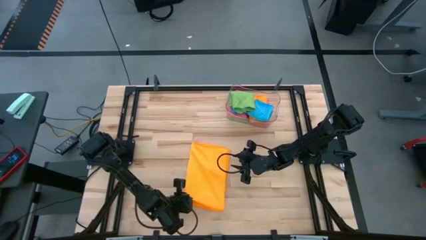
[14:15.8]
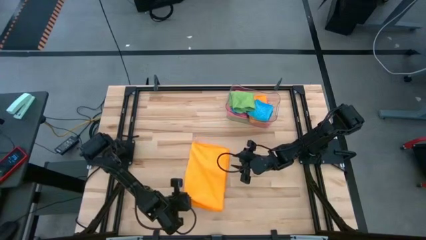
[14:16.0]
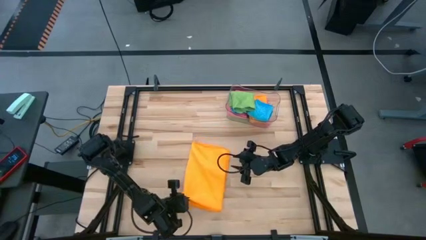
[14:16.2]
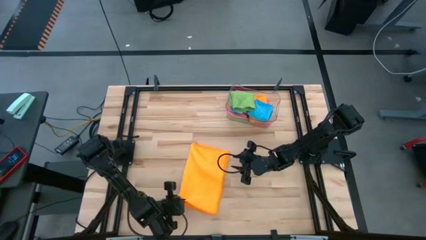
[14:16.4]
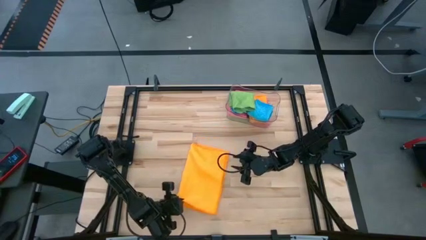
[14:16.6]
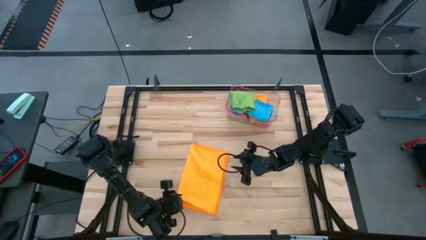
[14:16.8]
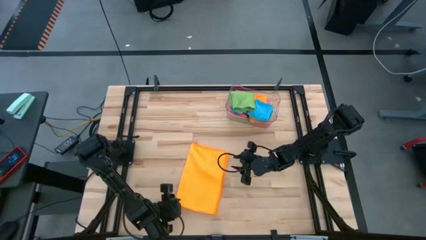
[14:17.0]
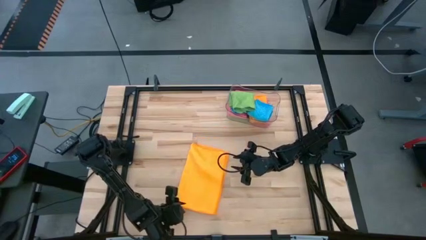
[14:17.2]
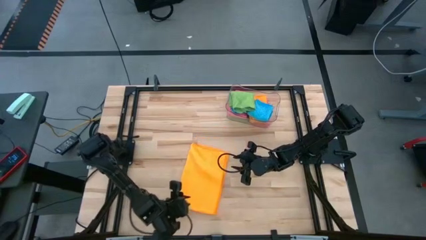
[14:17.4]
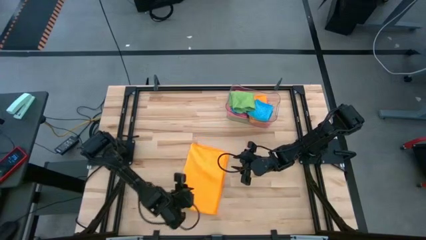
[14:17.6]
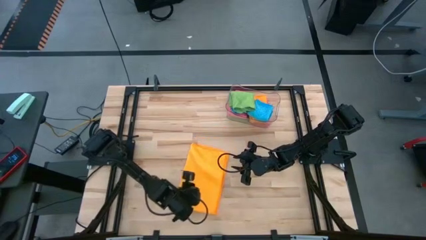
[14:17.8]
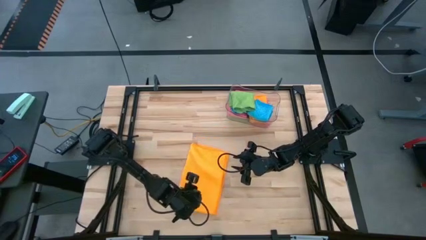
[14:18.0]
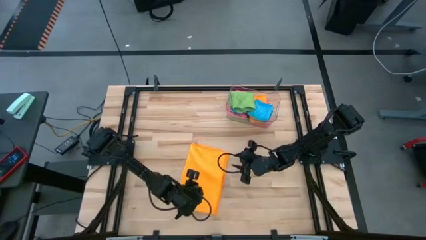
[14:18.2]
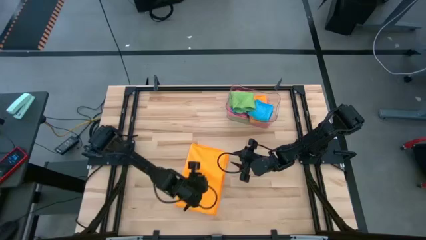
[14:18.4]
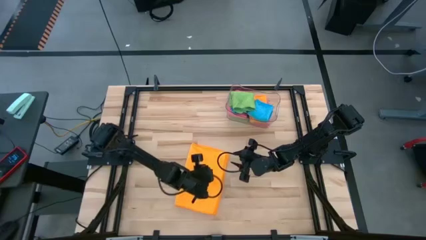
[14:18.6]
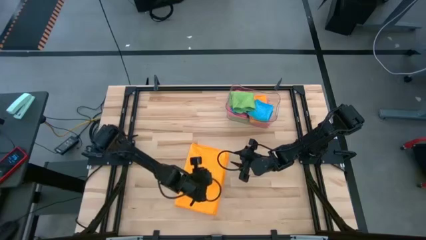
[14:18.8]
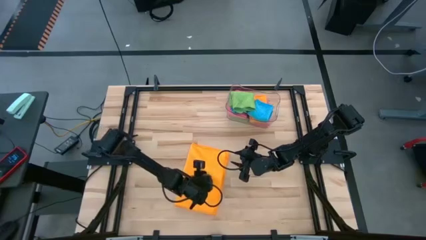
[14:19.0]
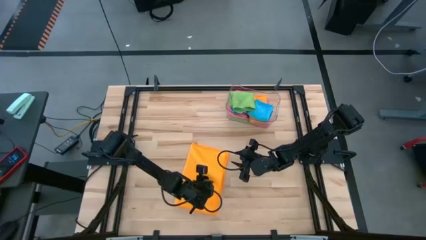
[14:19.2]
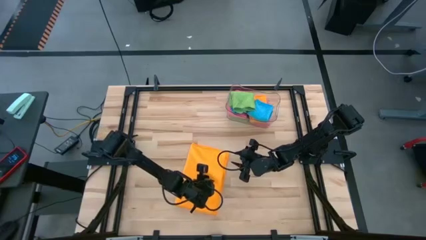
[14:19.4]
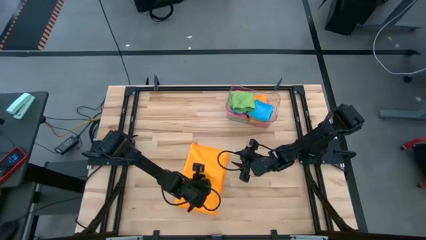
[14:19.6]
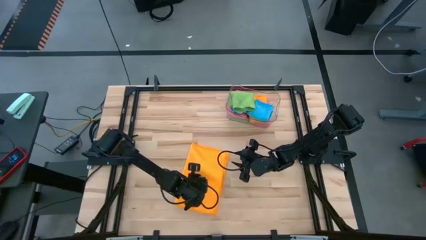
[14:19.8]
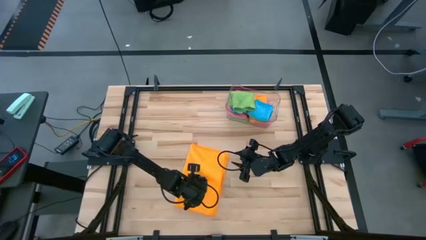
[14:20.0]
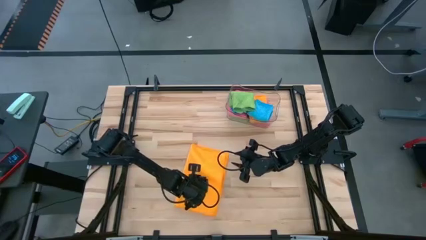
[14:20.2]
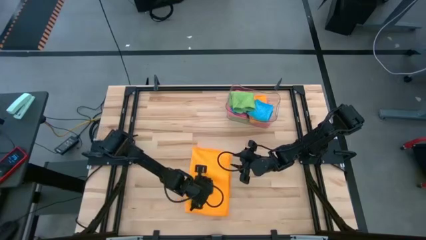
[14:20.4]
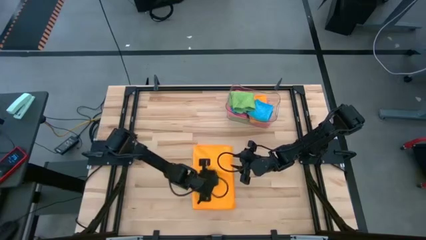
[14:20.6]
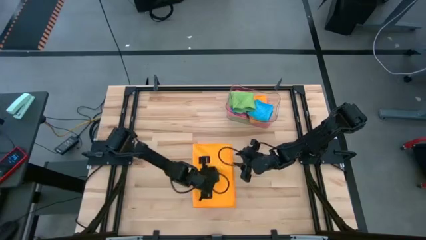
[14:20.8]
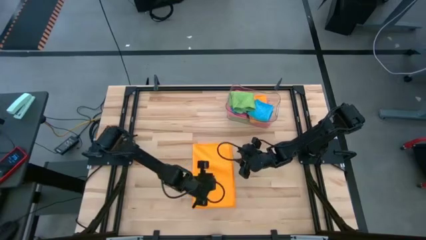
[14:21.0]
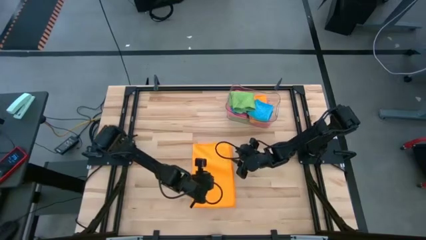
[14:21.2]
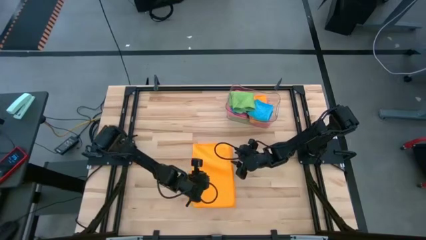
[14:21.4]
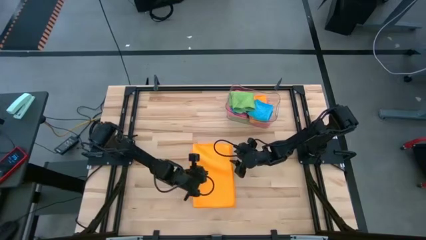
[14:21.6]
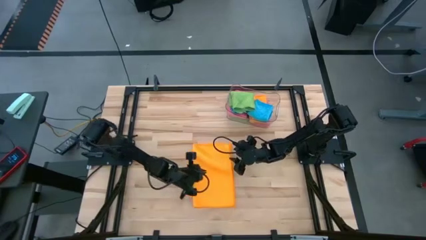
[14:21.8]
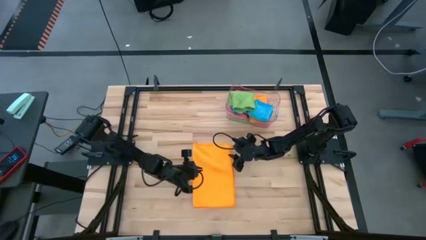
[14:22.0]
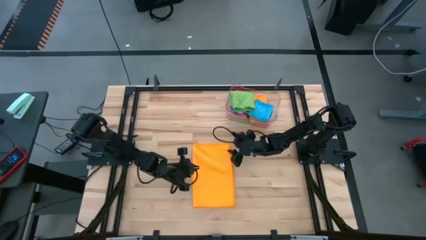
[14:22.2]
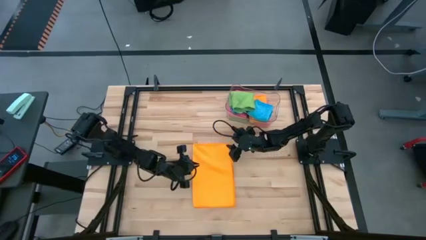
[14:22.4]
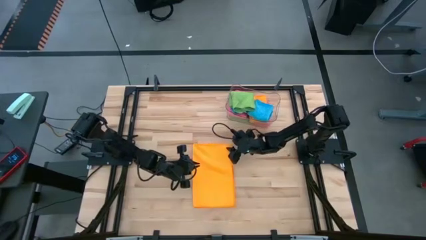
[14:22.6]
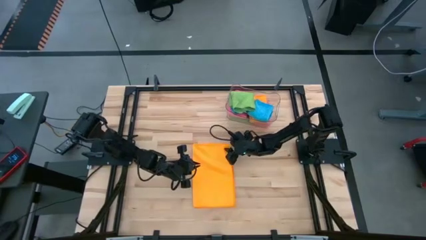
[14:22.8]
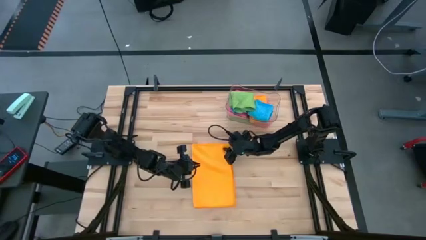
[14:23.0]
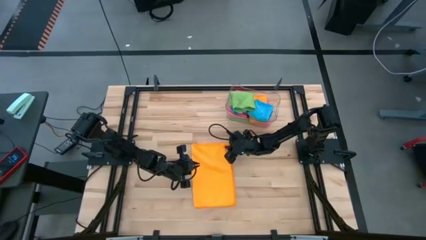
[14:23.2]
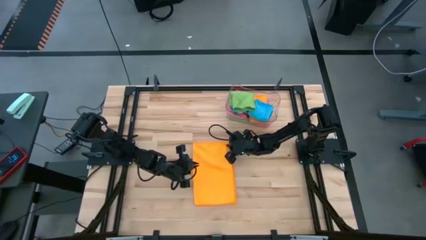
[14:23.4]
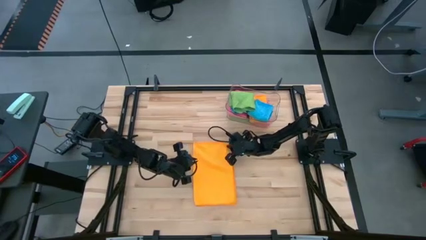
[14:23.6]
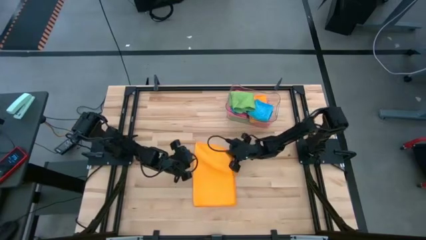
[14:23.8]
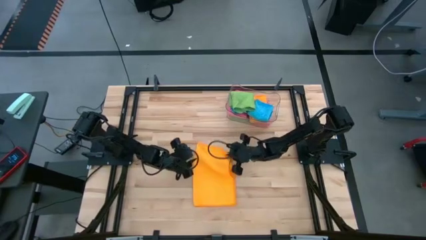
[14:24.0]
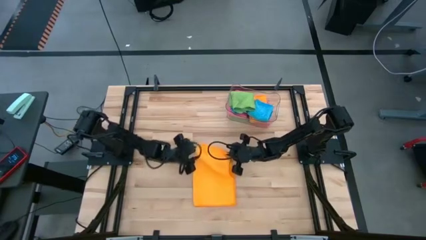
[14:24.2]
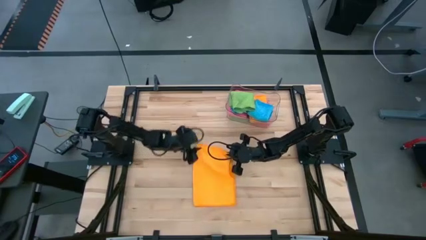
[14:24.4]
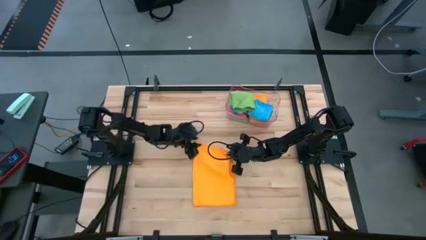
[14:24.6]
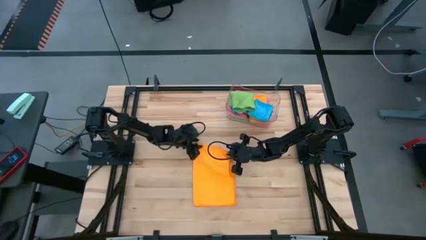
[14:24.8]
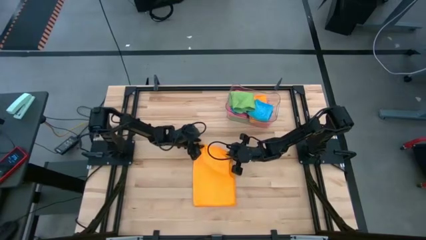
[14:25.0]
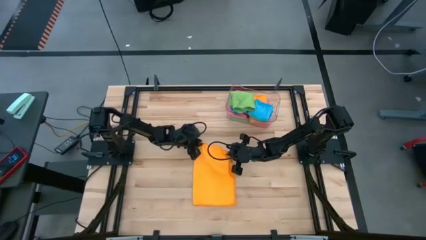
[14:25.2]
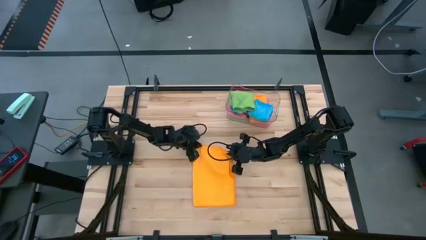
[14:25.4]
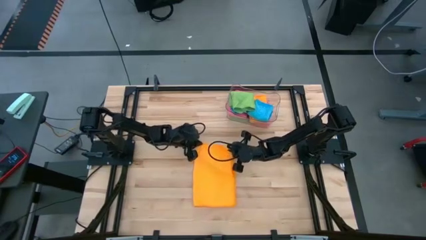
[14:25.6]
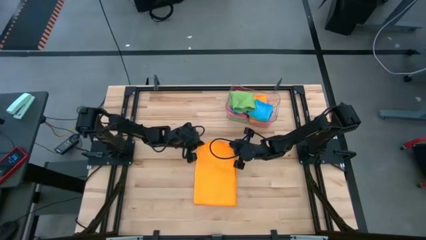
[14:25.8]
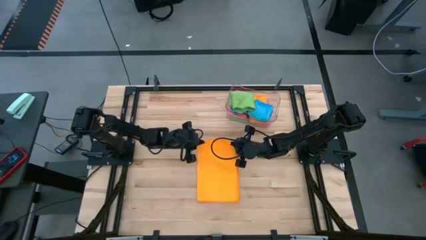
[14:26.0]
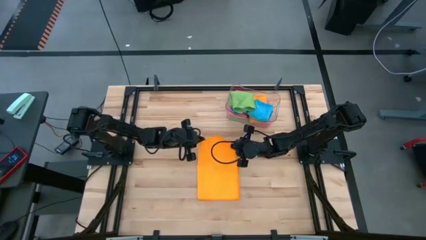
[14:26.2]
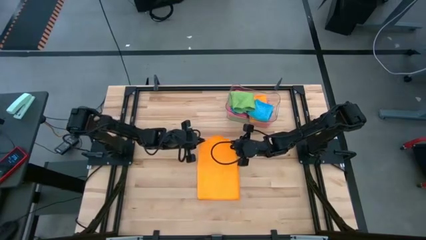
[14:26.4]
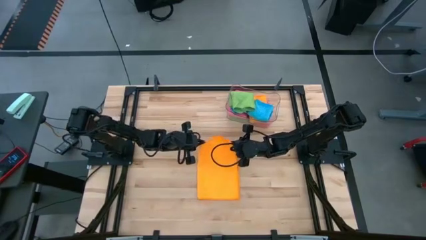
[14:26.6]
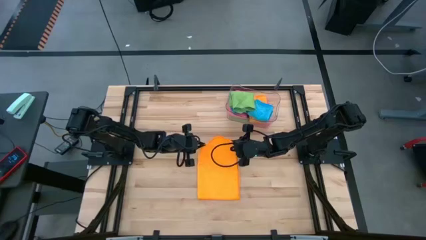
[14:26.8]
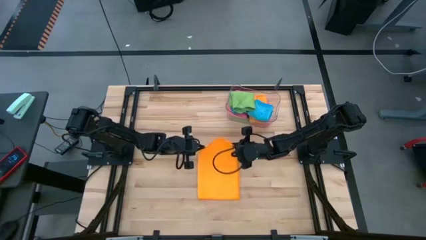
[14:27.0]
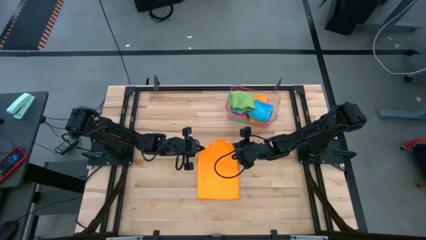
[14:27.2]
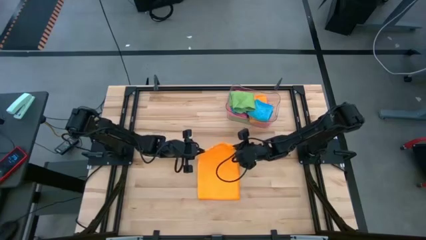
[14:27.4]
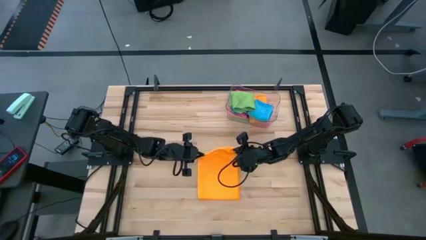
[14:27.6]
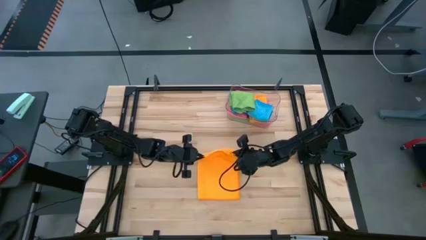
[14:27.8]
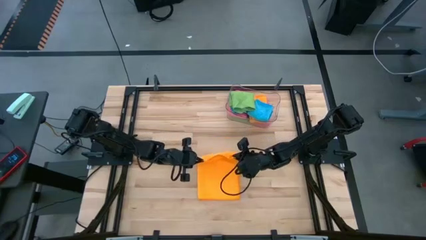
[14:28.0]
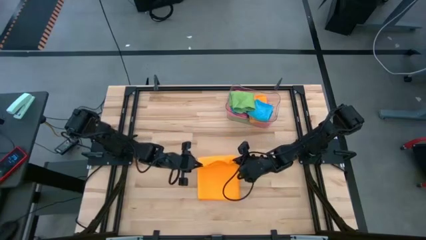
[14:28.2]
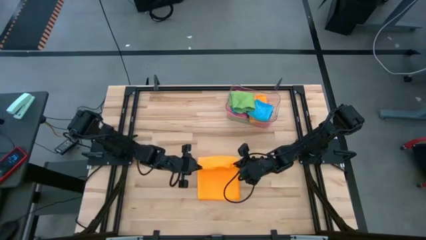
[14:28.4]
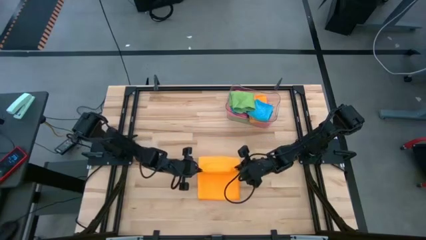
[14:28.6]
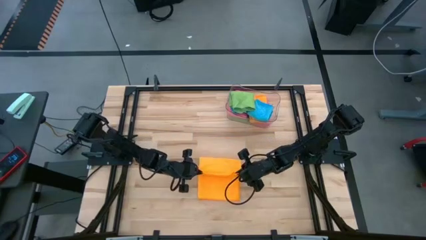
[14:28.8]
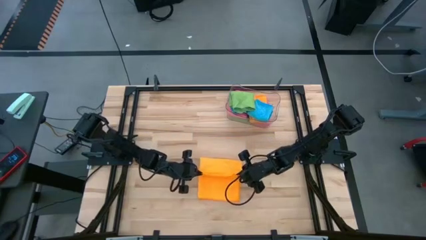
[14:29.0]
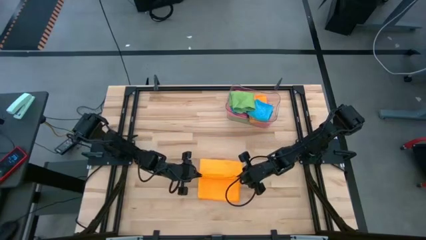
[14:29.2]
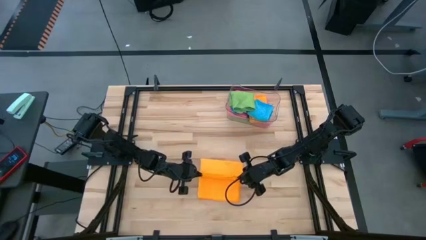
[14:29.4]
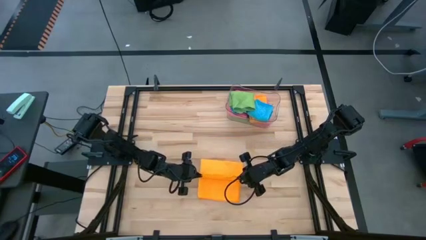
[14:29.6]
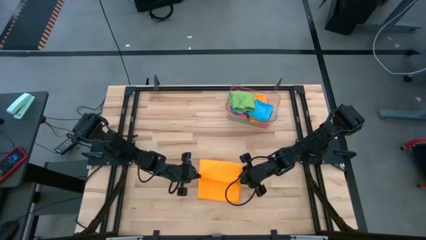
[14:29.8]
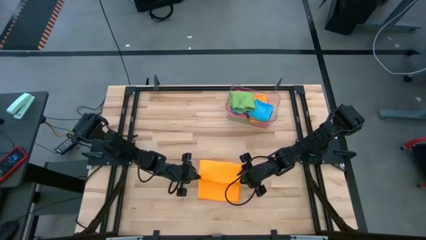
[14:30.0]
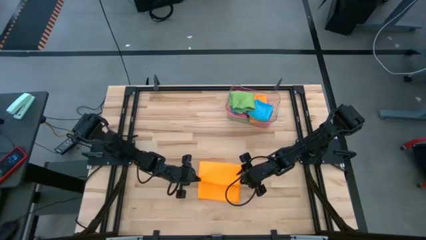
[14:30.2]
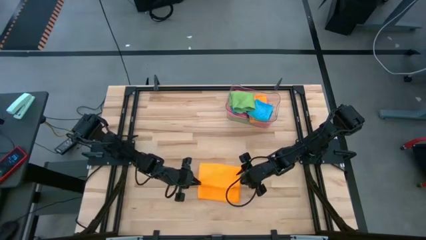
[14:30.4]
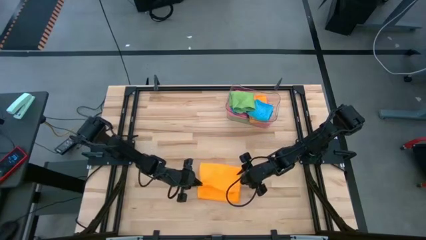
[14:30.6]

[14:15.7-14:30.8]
Task: Fold microfiber towels
Fold the yellow towel
